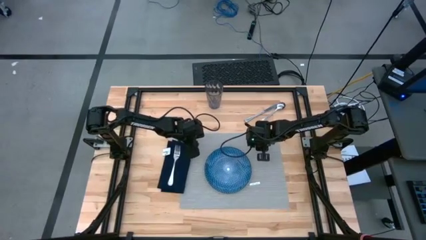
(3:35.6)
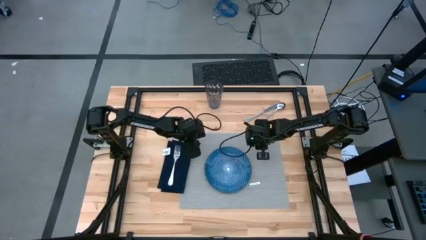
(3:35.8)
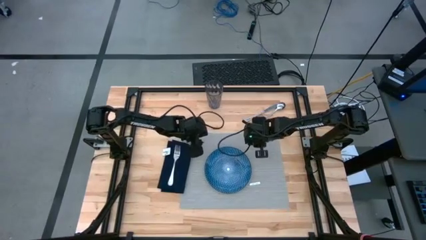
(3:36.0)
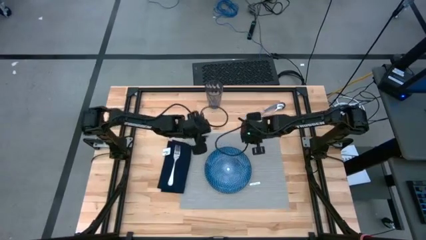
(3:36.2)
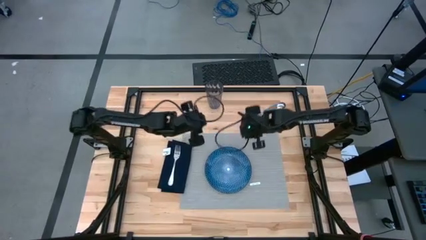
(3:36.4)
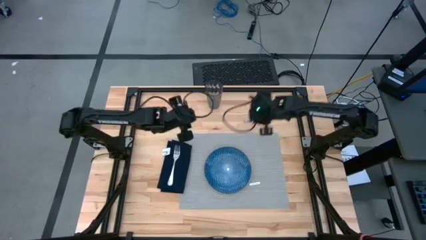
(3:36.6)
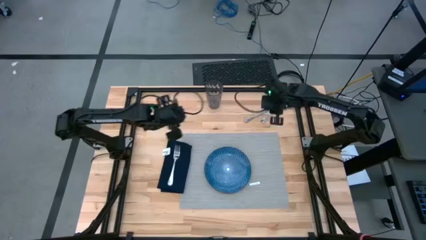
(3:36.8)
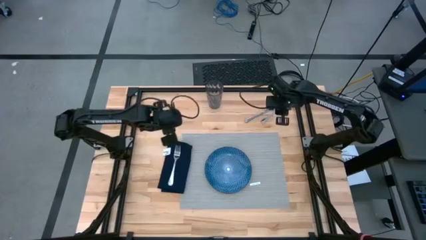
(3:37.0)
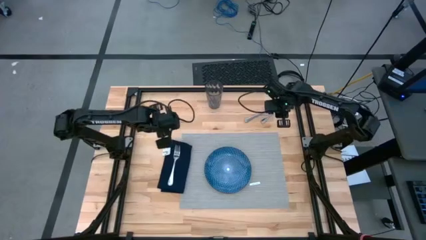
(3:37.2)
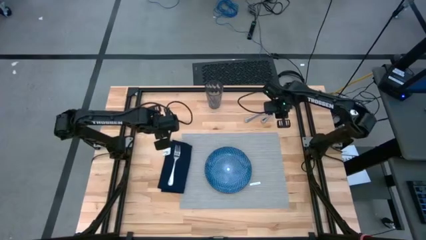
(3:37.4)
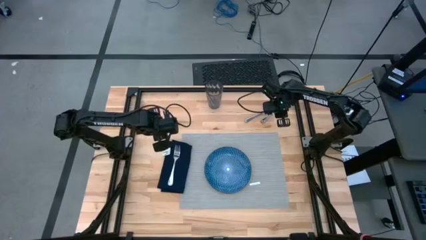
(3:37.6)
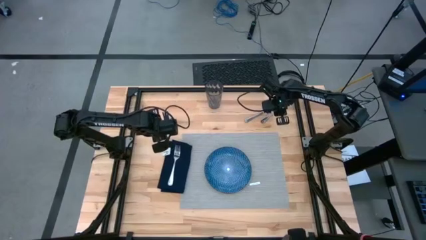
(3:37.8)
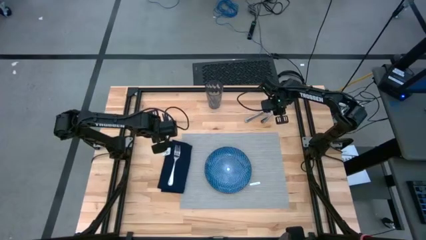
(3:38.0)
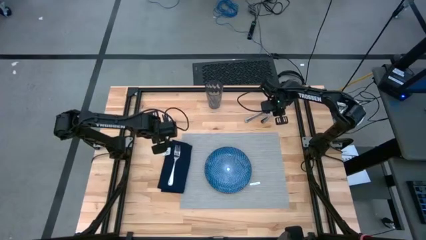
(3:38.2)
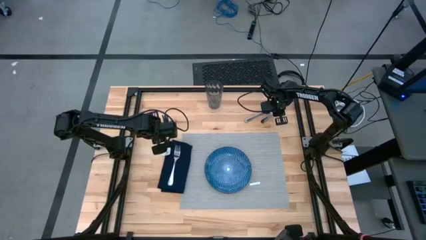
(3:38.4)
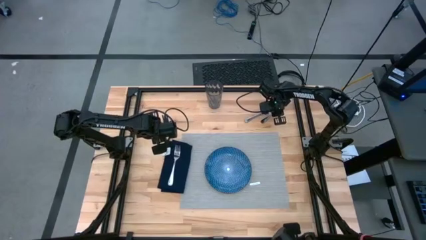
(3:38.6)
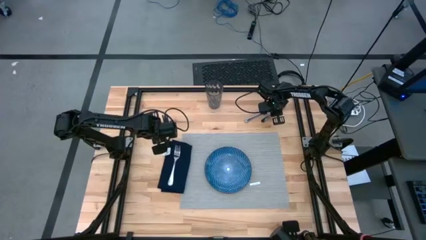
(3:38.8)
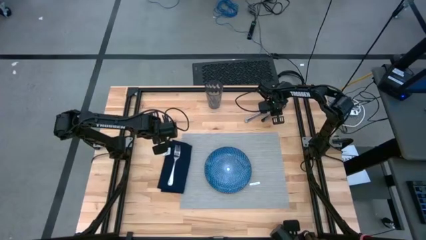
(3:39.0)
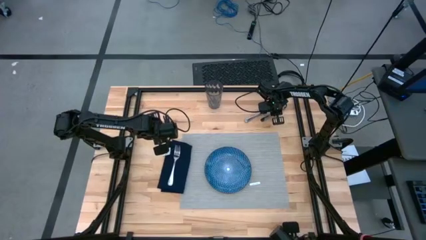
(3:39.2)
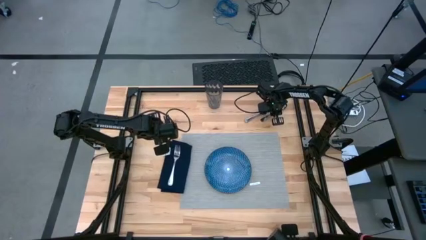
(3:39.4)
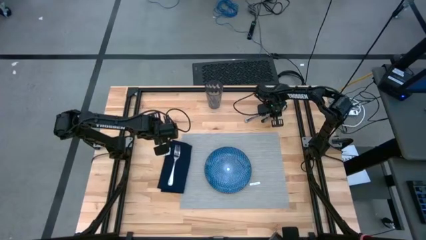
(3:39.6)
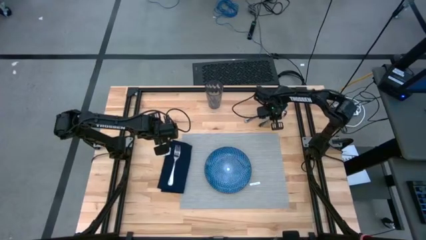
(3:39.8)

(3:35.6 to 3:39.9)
Task: Set table place
Put the silver spoon to the right of the blue plate on the gray placemat

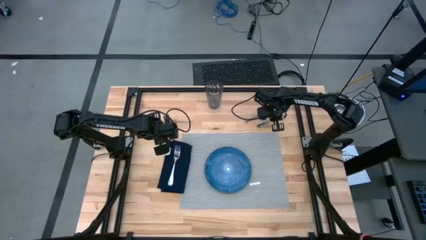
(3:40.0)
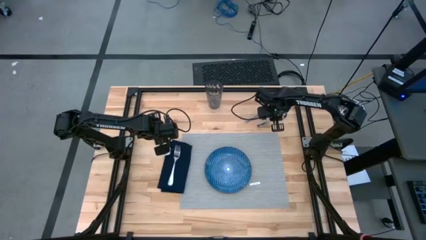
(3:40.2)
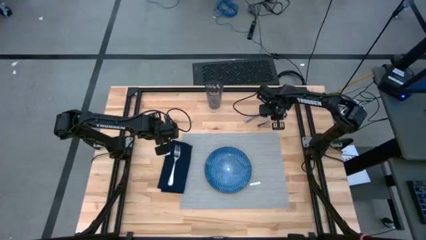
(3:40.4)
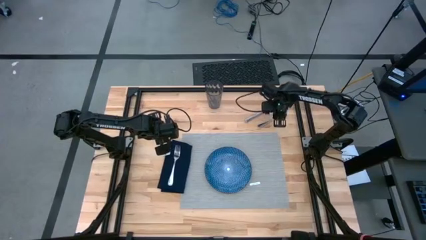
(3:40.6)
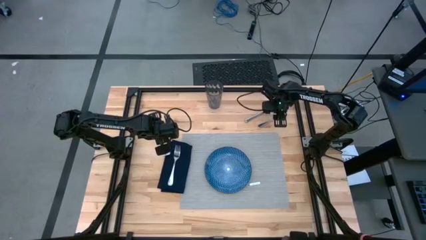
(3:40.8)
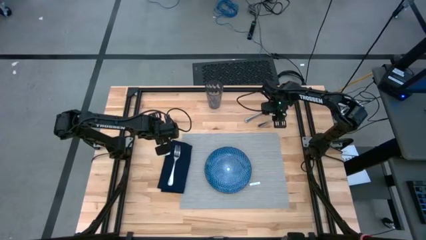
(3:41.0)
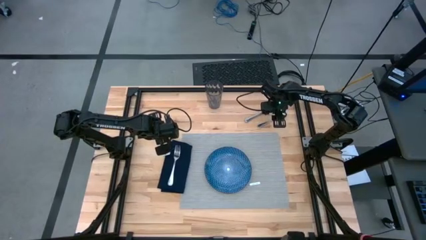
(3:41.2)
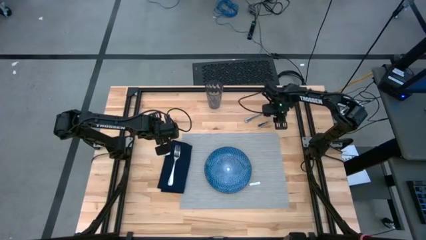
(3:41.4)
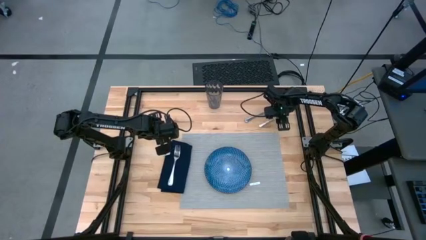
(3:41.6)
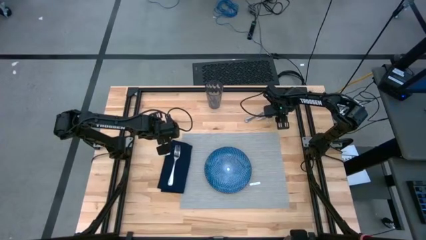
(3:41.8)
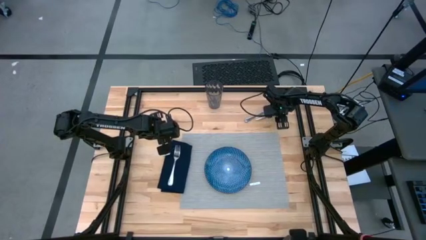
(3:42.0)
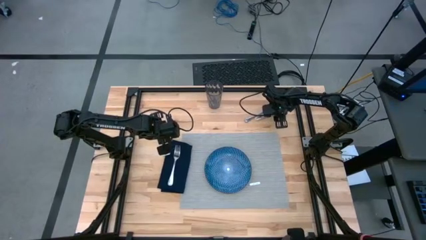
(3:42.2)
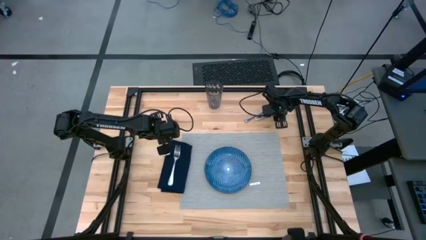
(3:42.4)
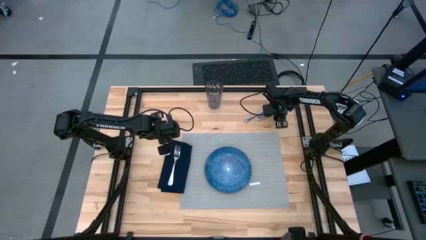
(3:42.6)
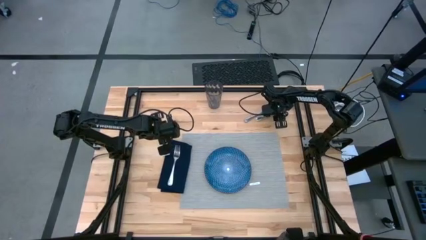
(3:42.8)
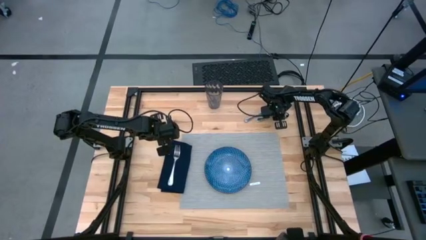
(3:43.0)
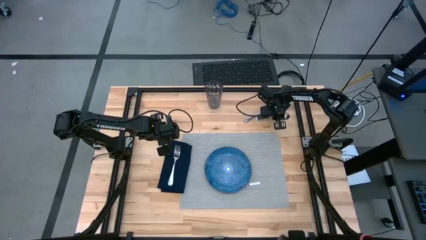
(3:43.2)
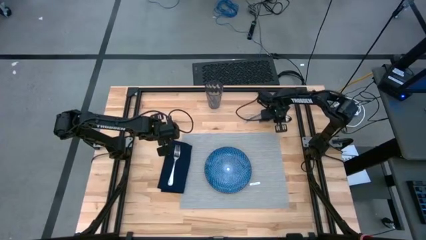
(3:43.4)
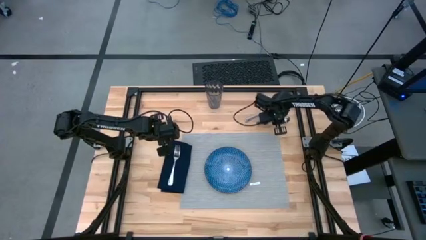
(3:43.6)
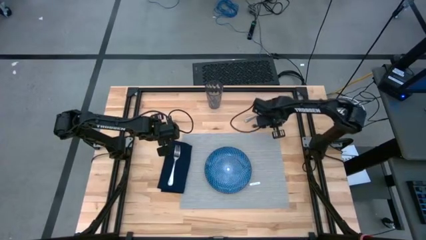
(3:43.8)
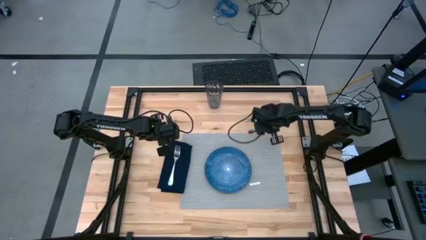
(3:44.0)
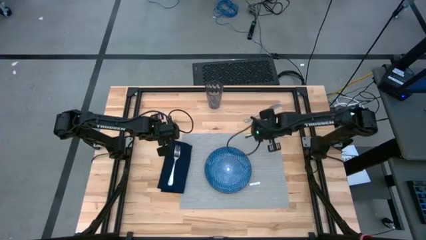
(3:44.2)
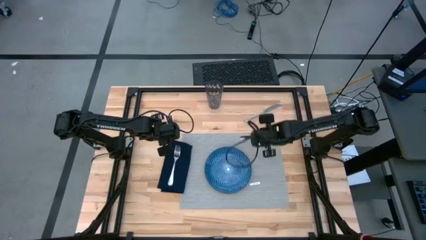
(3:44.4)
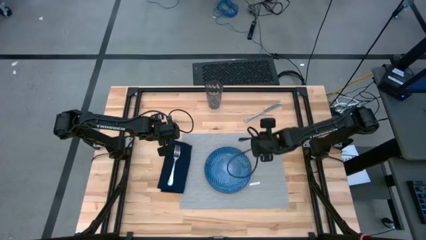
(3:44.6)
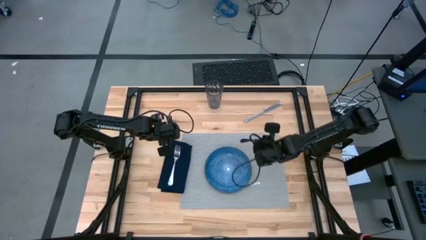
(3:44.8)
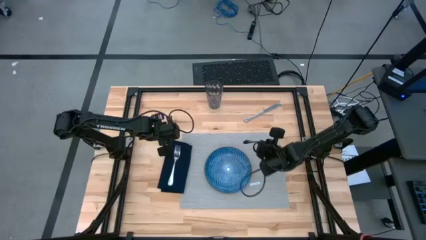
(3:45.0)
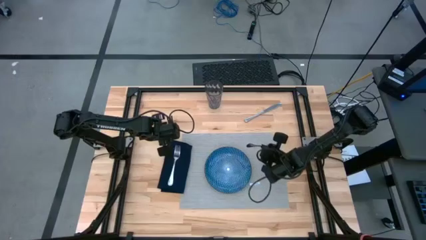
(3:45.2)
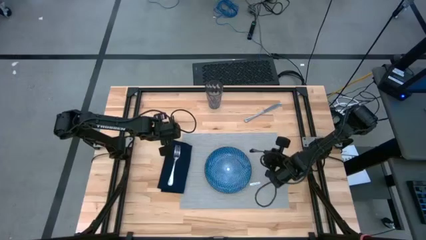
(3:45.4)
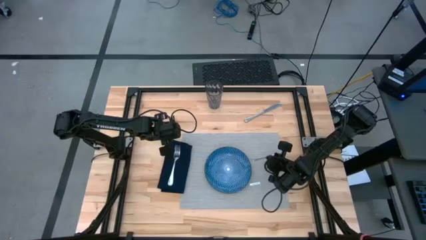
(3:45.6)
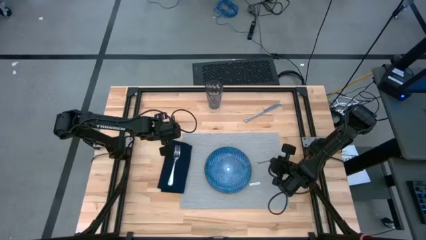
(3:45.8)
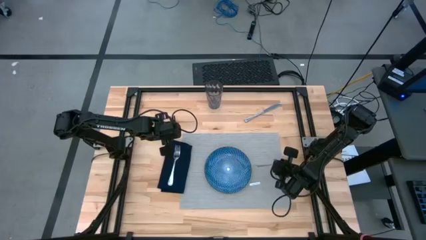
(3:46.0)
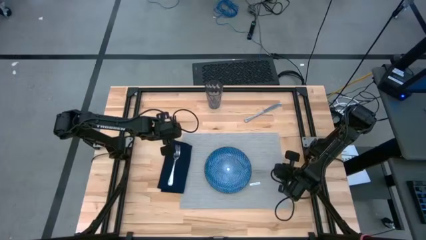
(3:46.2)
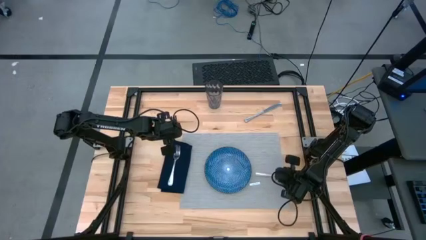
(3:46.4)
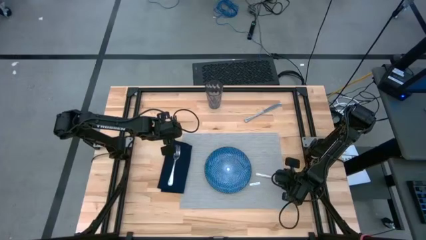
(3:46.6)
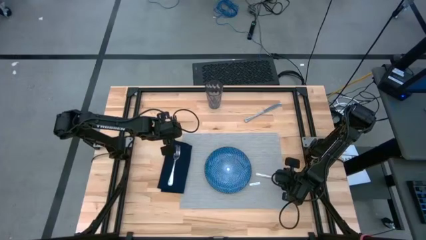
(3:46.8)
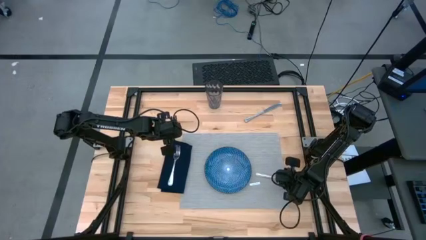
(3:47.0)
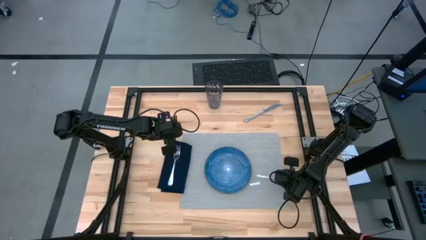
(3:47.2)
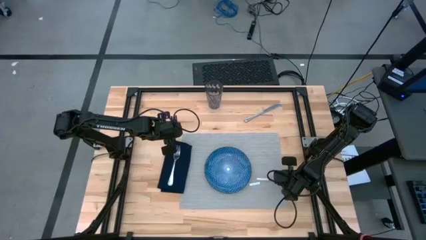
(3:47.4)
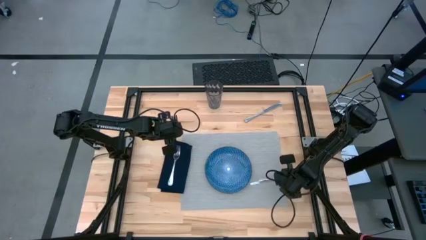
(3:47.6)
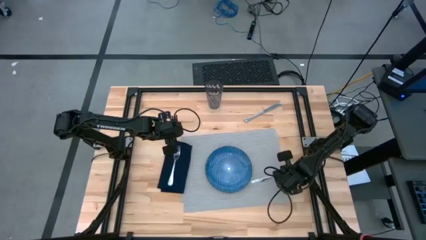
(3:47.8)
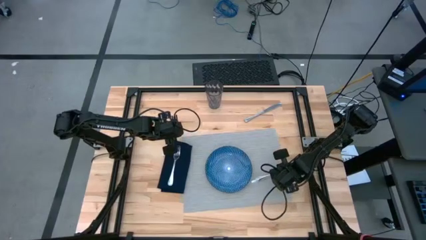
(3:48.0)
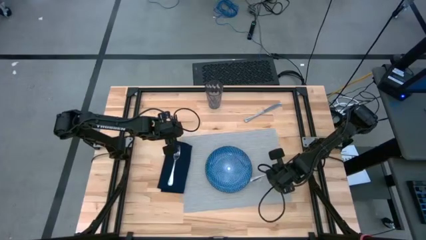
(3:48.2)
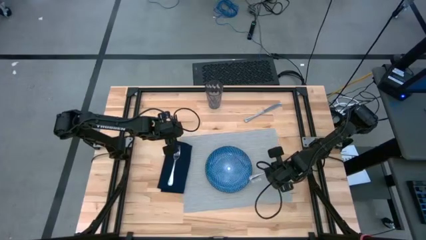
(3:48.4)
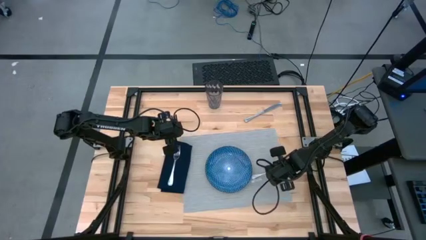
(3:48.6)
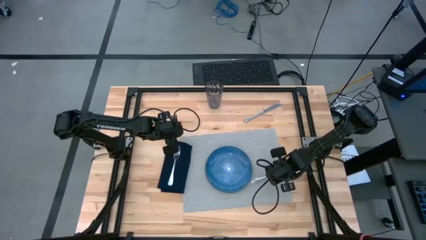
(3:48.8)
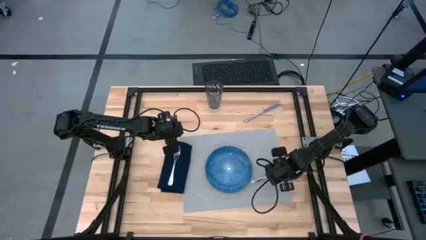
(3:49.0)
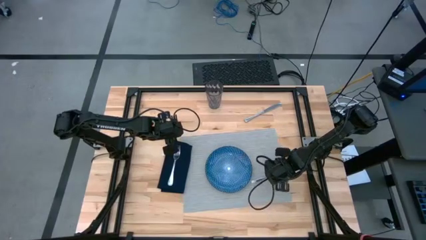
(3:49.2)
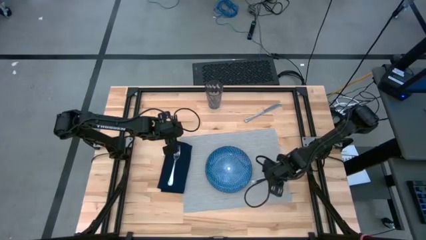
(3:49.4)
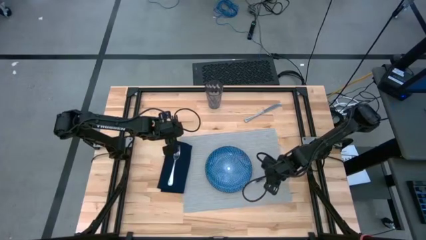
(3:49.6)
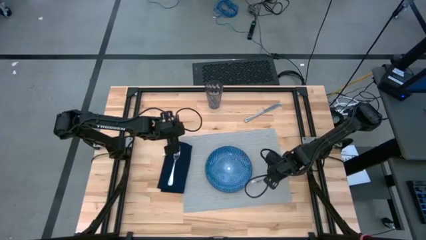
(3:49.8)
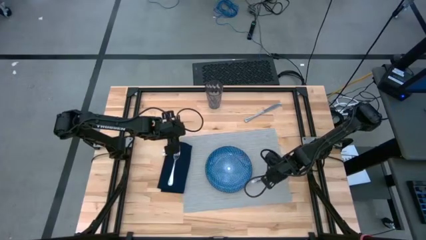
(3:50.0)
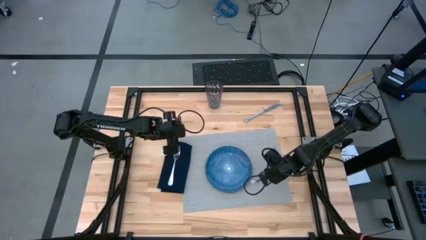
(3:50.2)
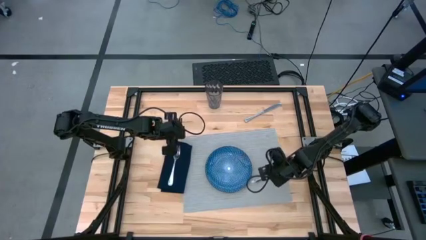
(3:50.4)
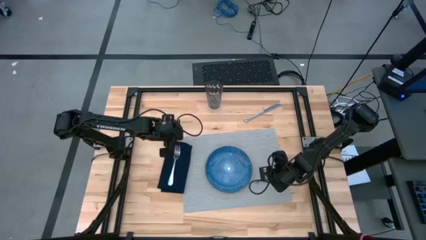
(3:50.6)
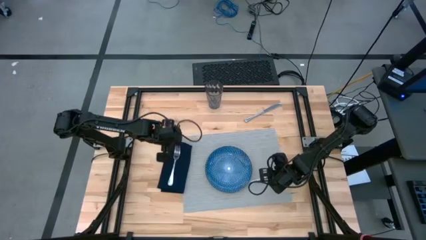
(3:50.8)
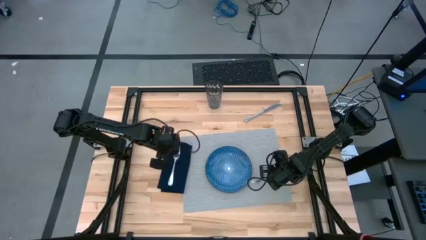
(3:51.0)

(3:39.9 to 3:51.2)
Put the silver spoon to the right of the blue plate on the gray placemat

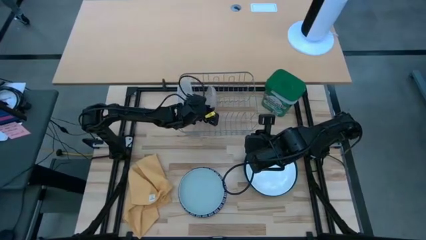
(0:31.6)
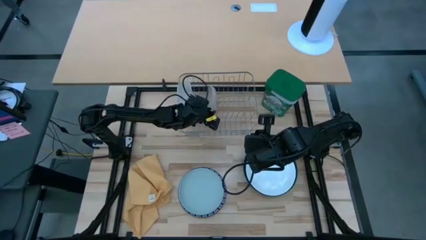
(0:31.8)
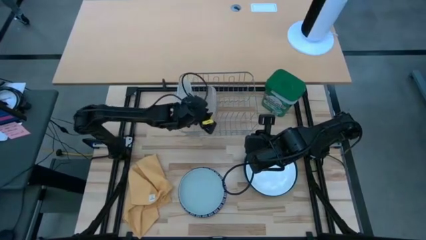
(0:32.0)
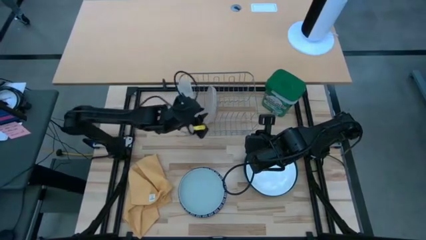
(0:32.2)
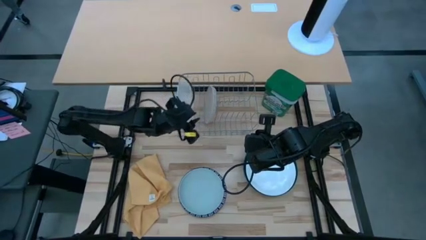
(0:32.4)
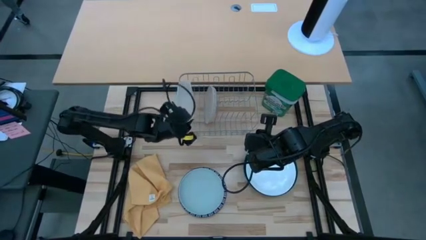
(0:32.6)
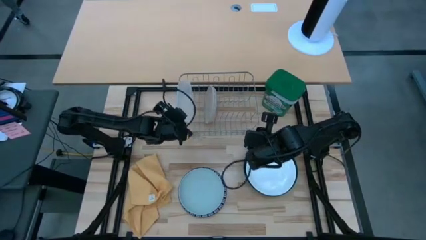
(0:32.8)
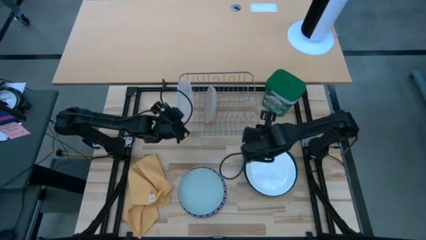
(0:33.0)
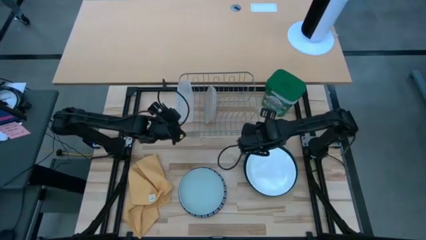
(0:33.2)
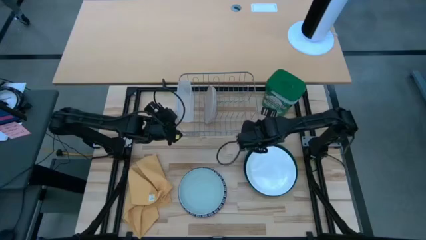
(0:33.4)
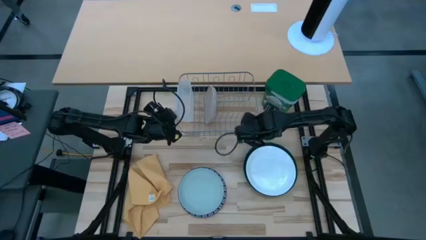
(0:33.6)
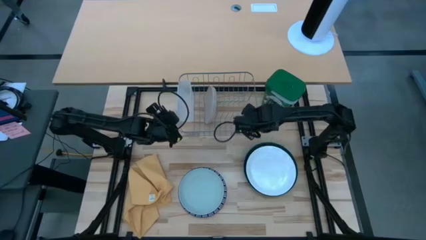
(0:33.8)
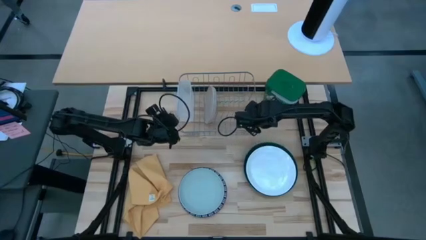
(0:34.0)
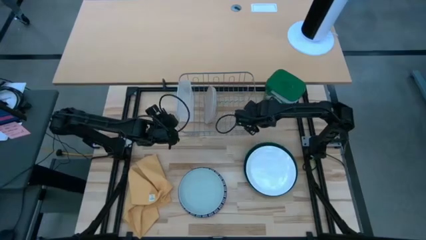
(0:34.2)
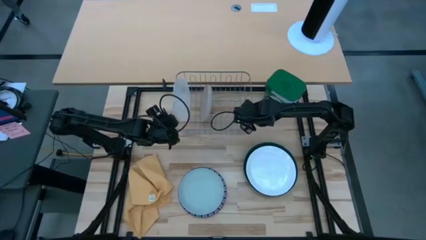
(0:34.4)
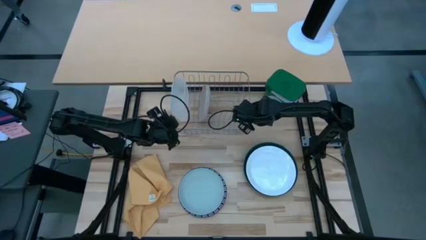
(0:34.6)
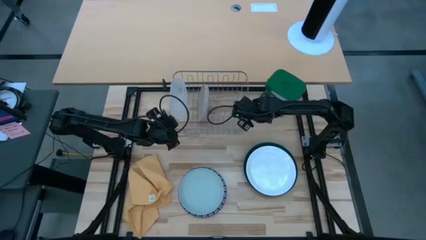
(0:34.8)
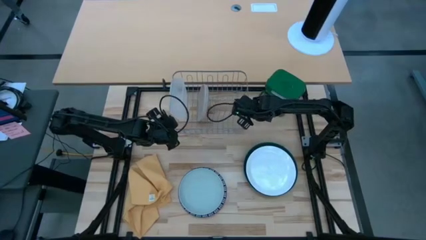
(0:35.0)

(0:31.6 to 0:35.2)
Task: Sort dishes
Adjust the dish rack
